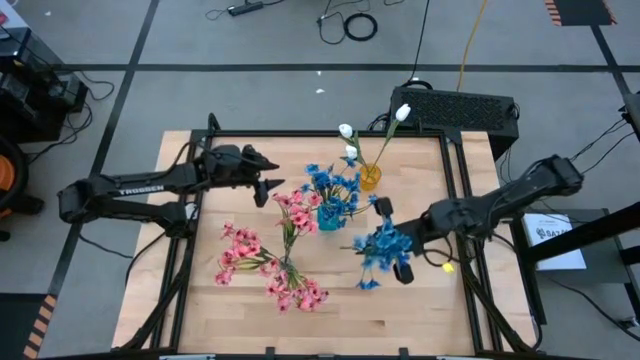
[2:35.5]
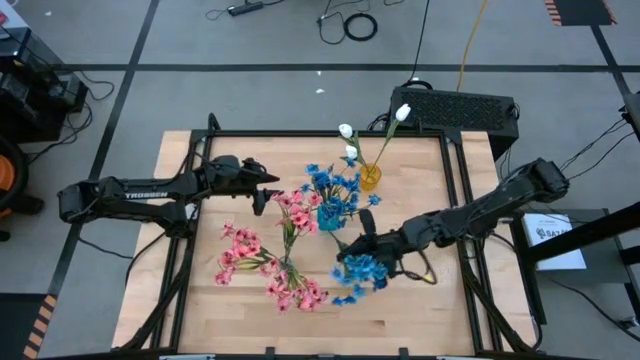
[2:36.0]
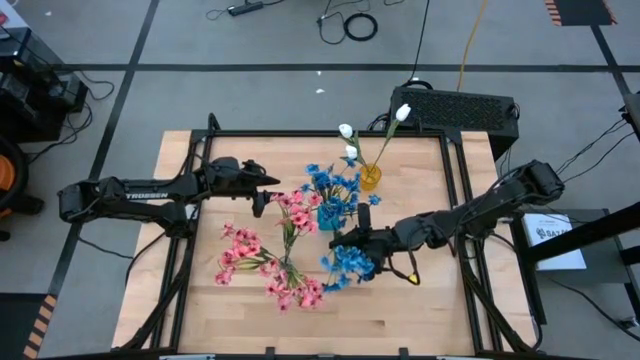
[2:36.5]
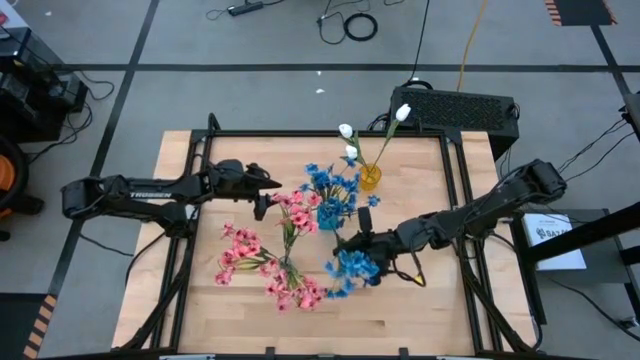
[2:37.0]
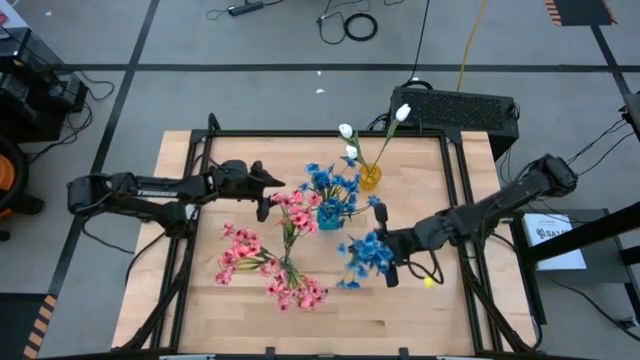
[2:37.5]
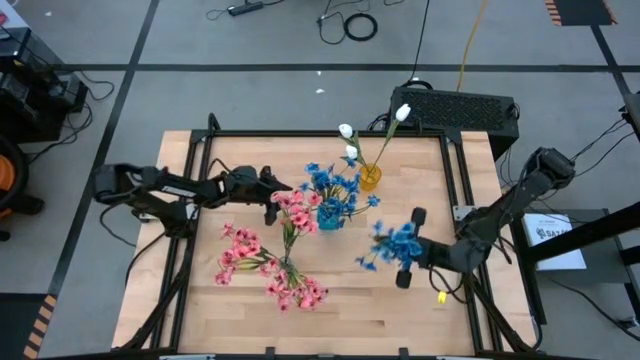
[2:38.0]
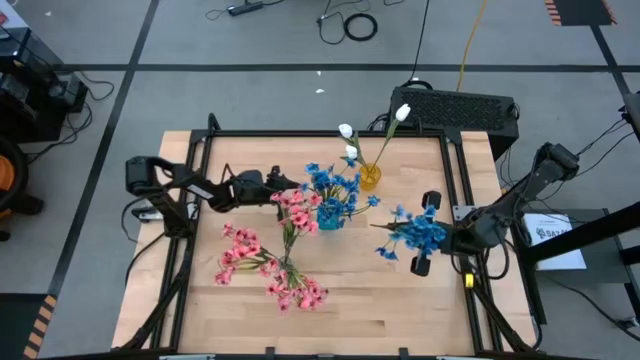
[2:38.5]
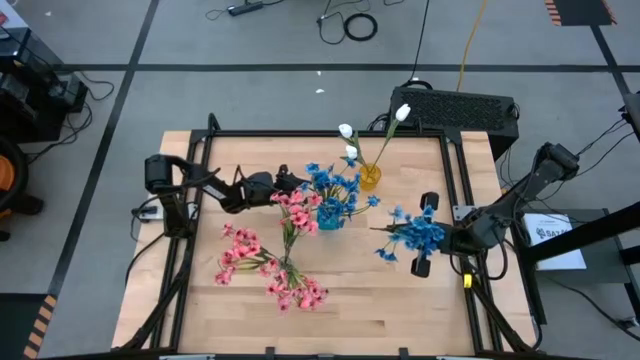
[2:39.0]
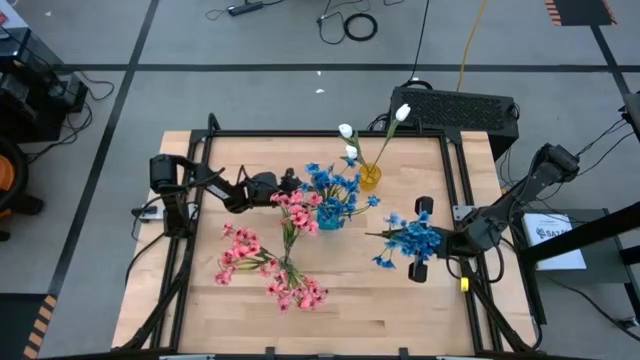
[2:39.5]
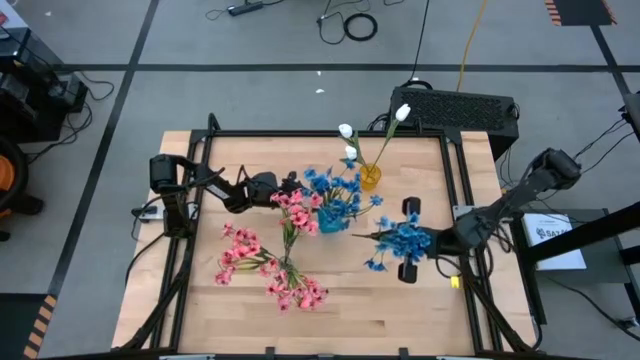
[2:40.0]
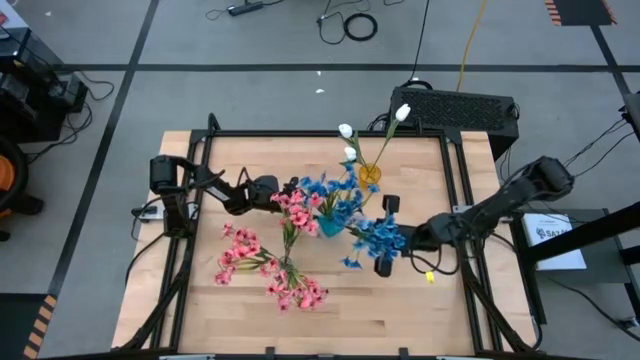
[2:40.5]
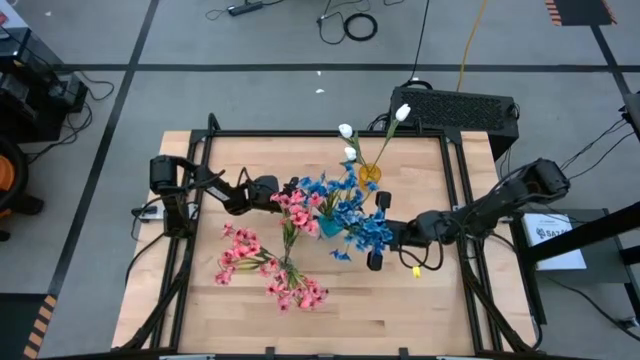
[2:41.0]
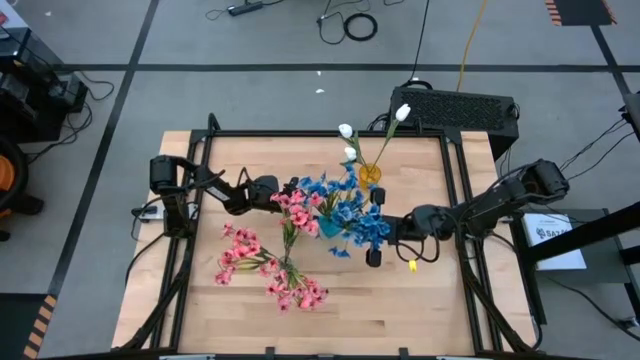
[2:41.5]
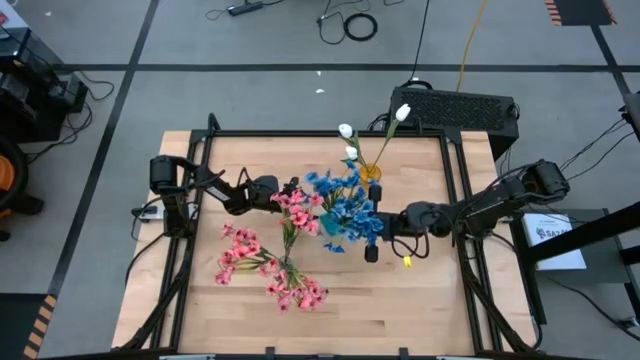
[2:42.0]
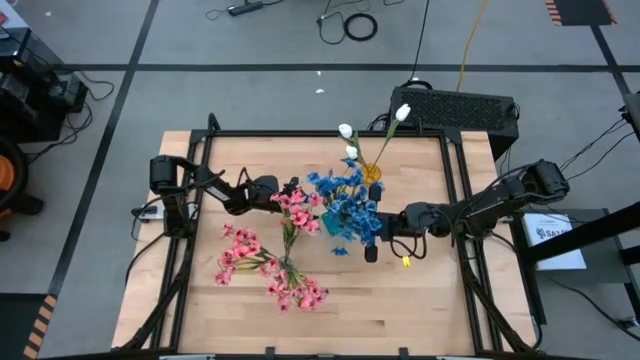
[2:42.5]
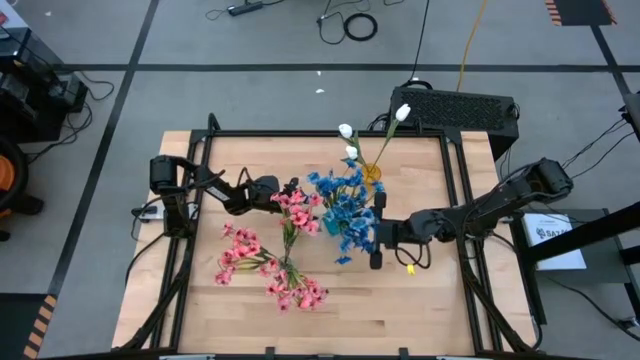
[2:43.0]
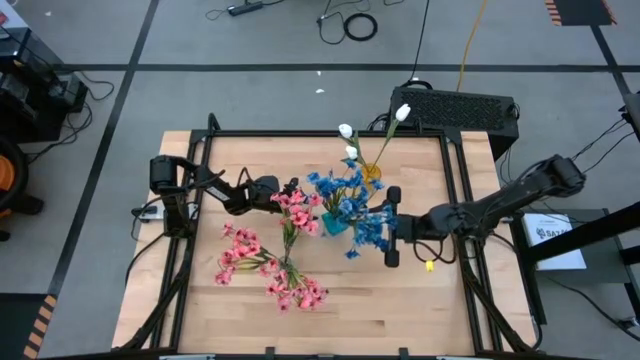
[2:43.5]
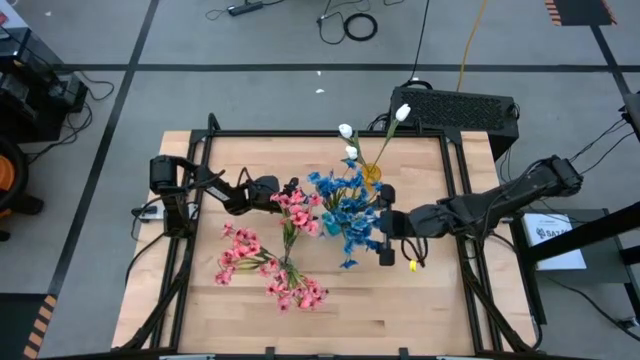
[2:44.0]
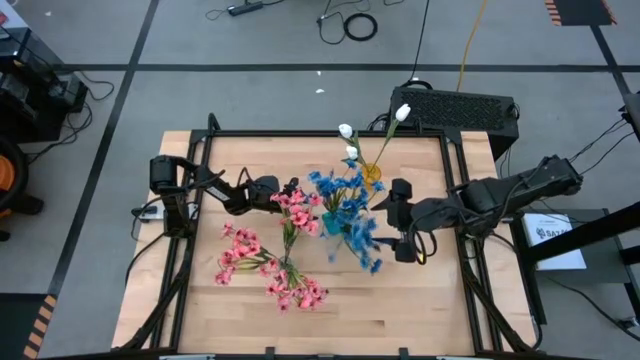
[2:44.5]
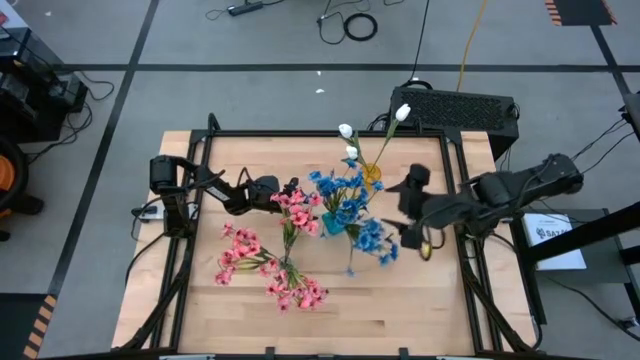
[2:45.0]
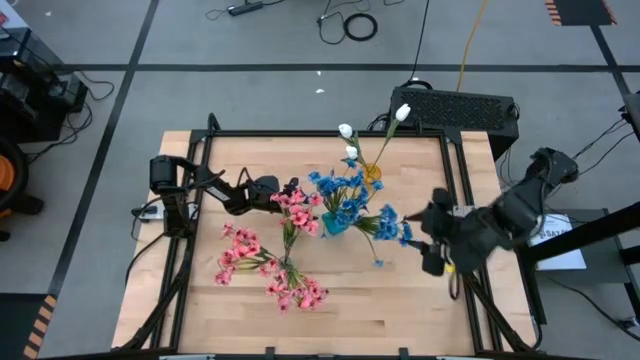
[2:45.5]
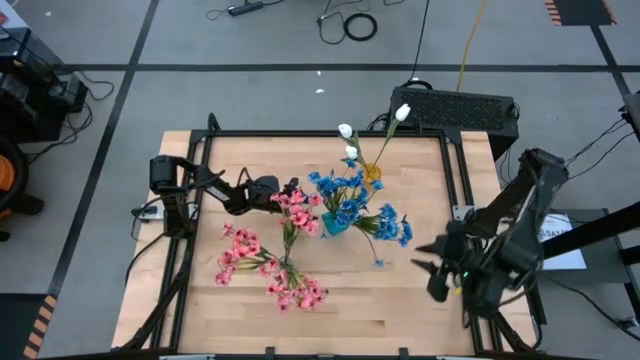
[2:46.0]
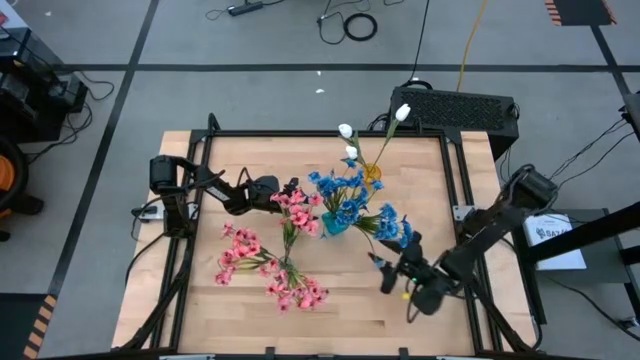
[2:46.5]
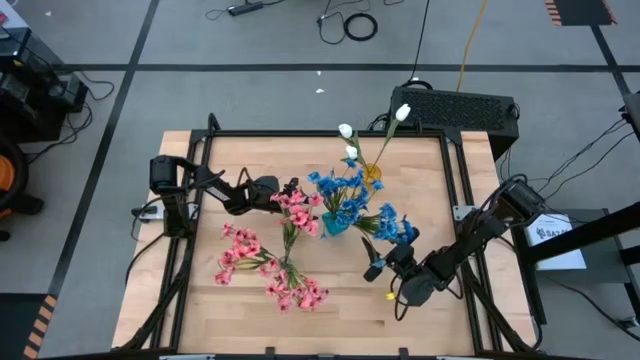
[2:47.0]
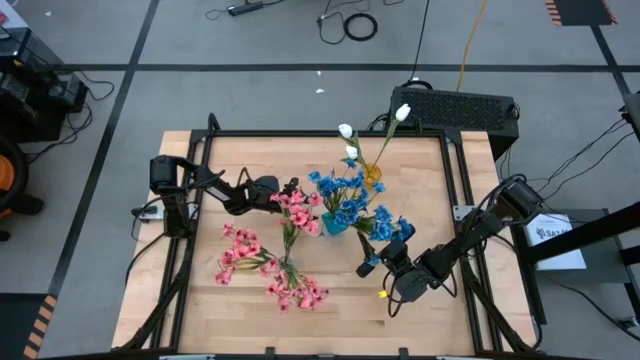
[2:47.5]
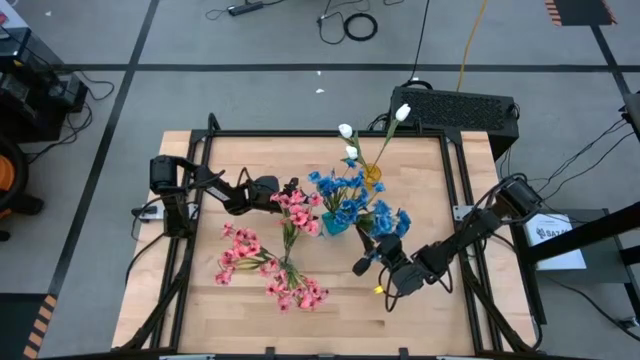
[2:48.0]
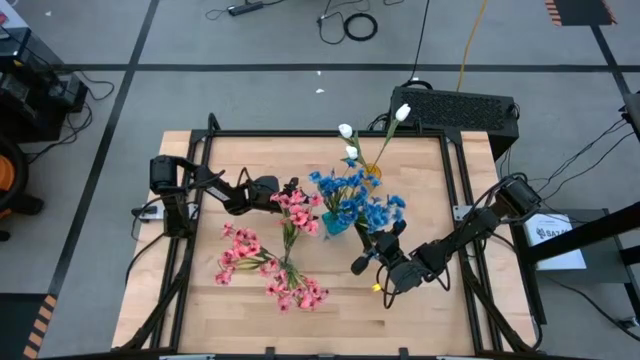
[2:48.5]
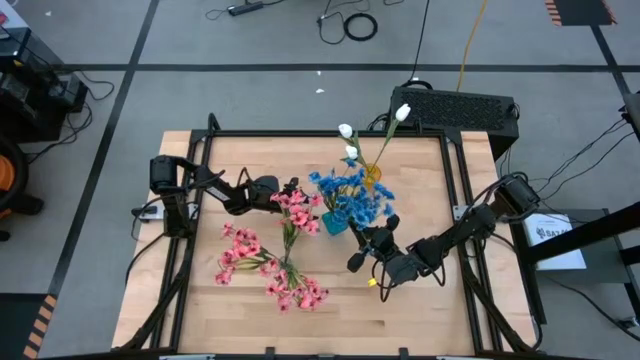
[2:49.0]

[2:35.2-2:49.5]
Task: Sort flowers into vase by color
Put the blue flowers into the blue vase

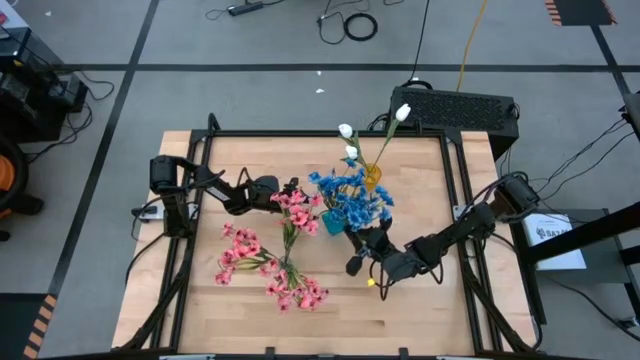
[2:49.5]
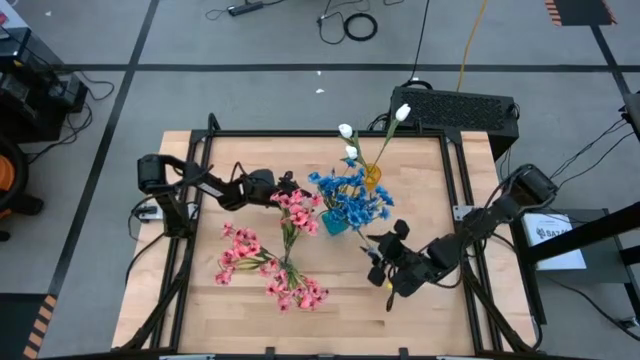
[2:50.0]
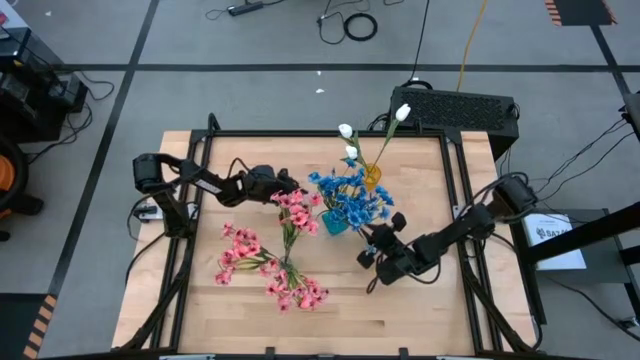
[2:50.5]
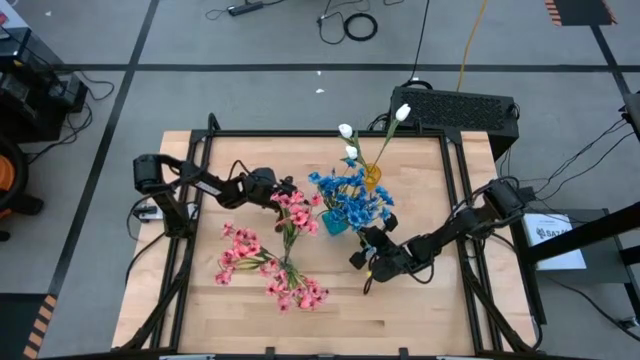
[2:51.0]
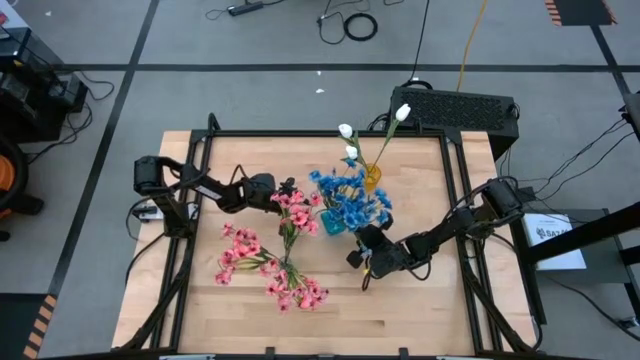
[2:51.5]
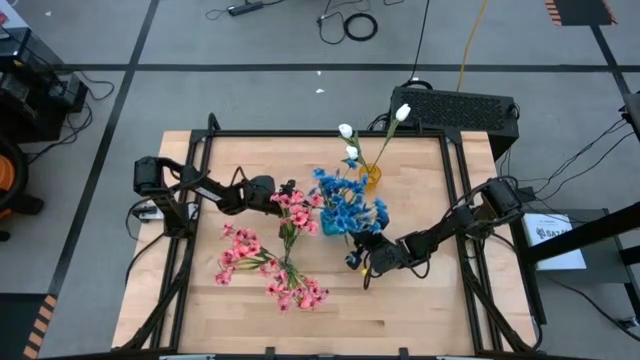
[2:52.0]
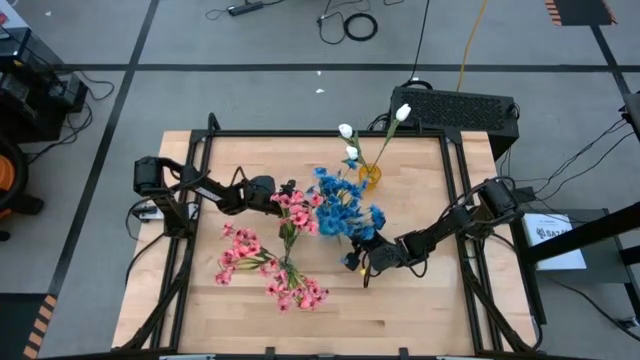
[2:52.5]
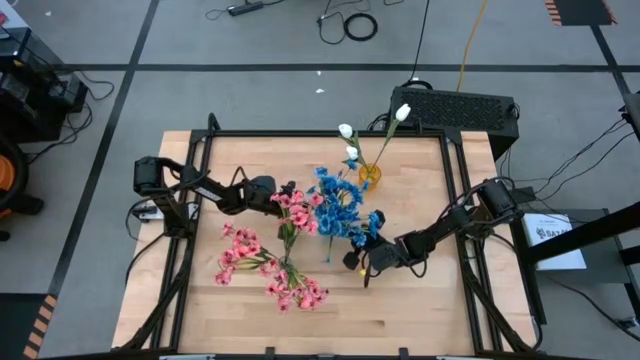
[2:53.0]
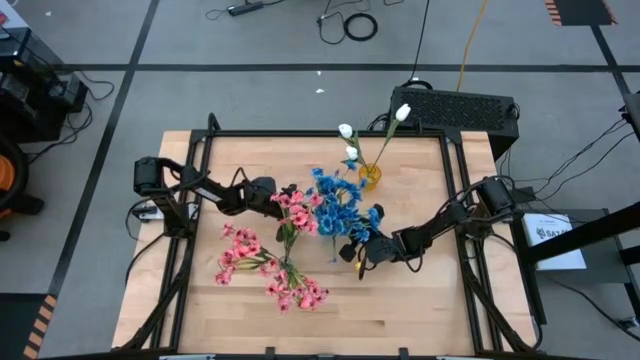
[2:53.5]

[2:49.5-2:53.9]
Adjust the blue vase

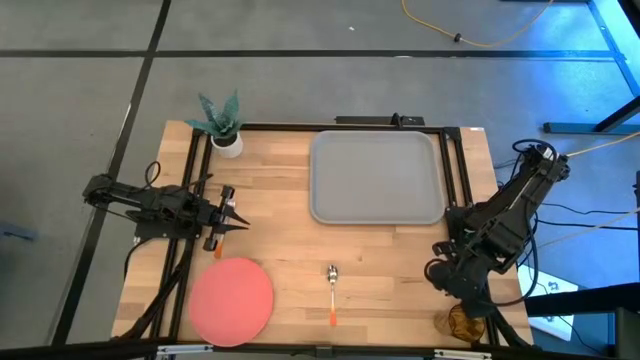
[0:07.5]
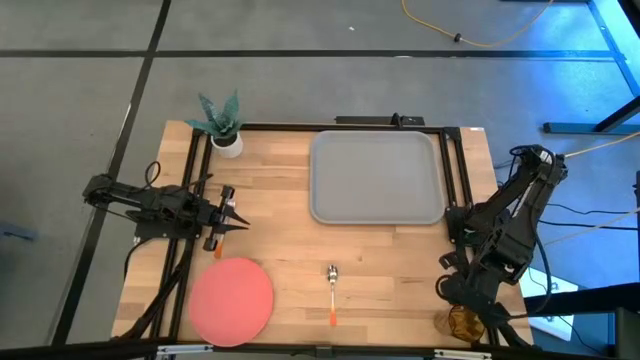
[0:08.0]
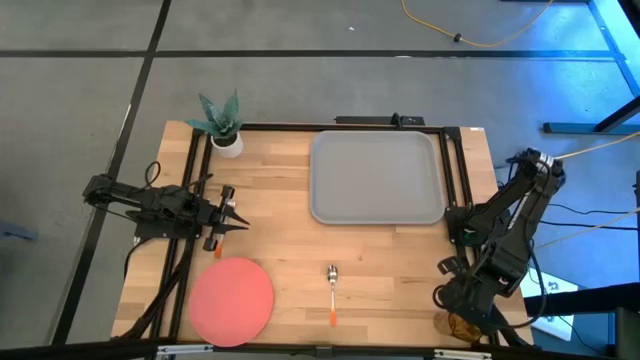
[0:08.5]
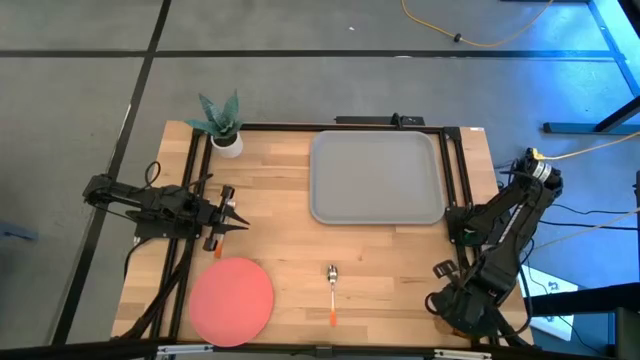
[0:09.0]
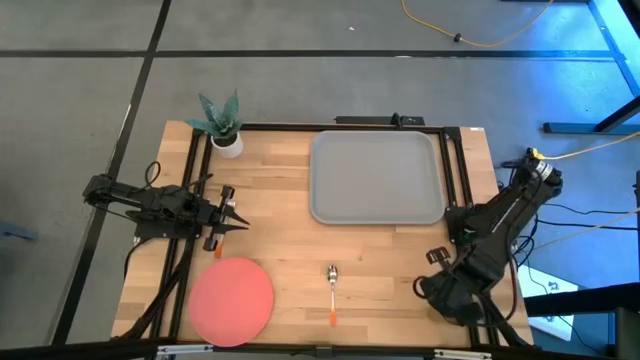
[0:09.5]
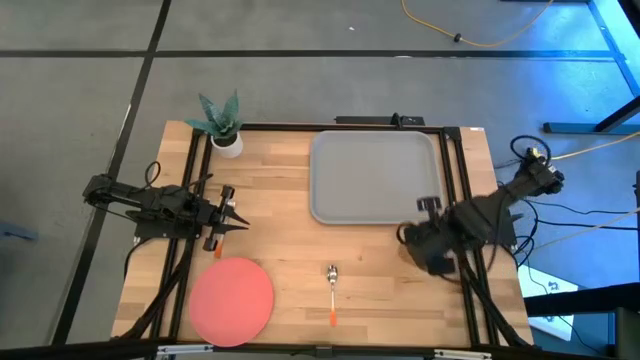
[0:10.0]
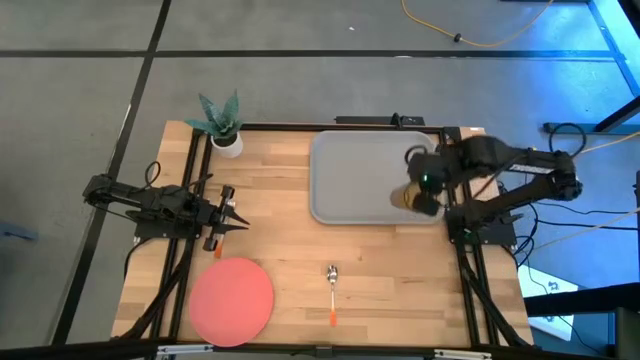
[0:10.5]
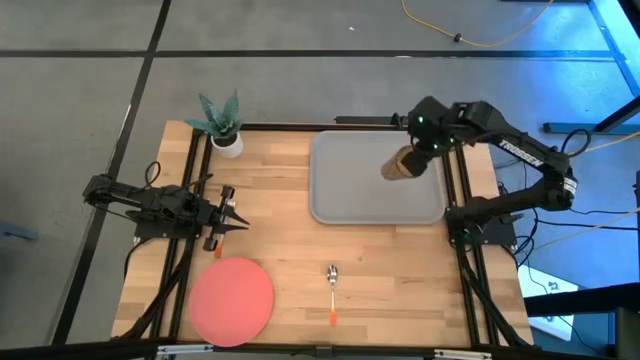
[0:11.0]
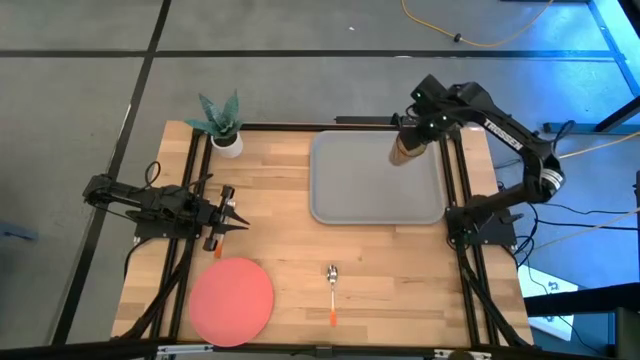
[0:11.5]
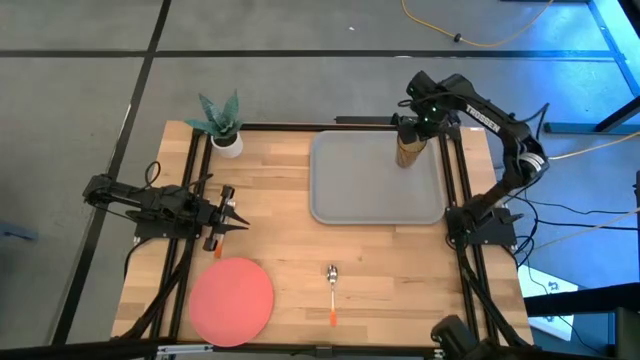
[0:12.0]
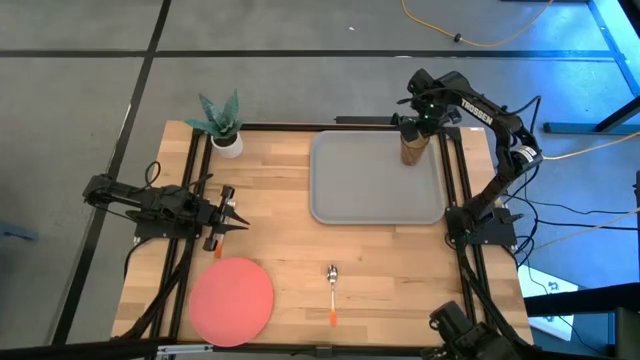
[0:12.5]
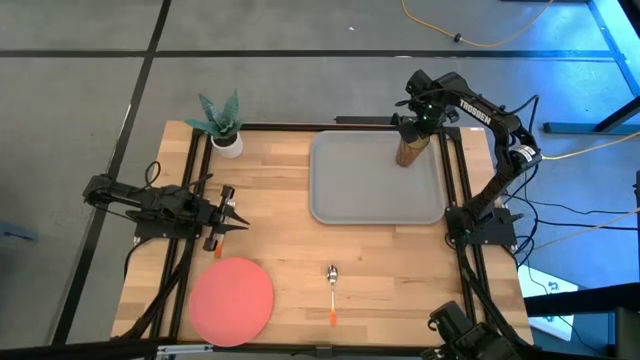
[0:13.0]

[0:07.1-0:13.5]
Task: Pick and place plate/cup/fork/spoon on tray
Put the glass on the top right on the gray serving tray
